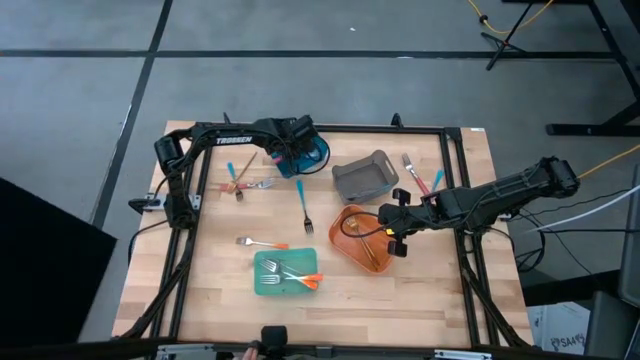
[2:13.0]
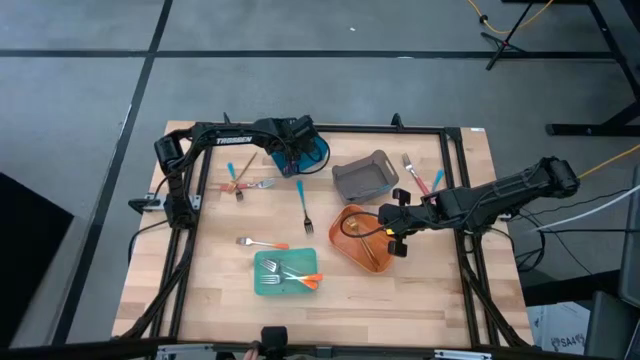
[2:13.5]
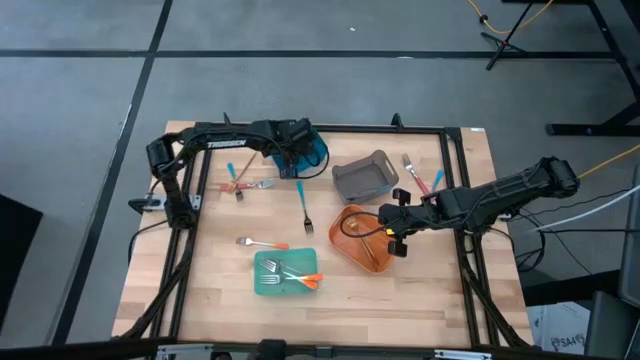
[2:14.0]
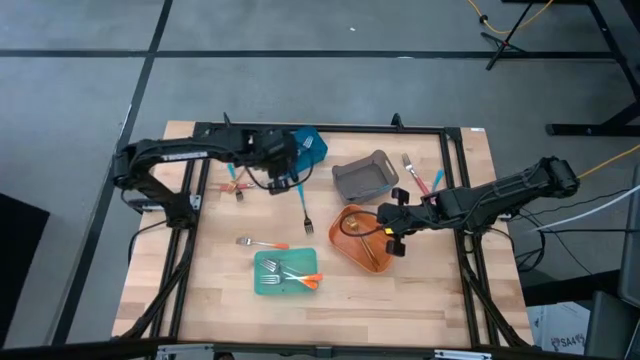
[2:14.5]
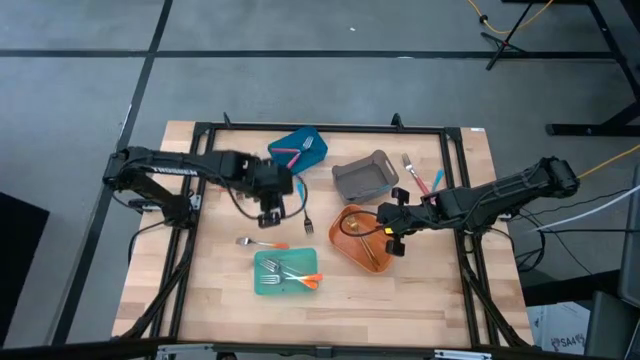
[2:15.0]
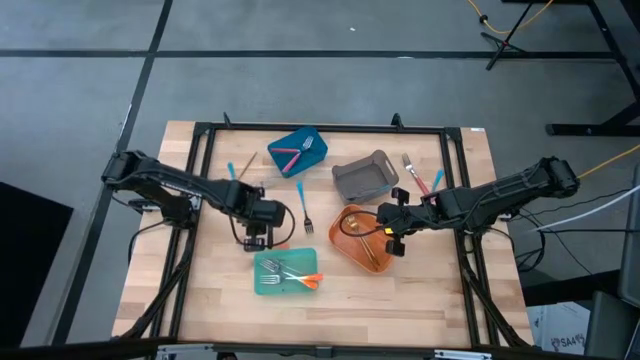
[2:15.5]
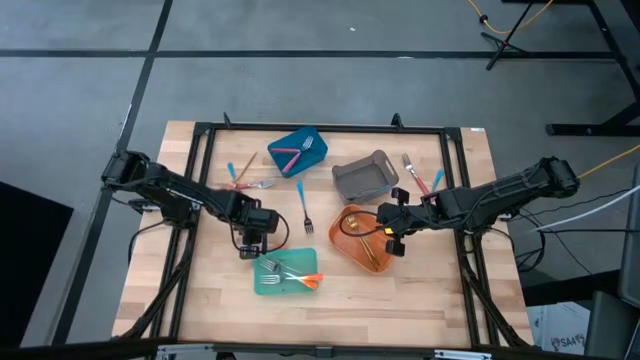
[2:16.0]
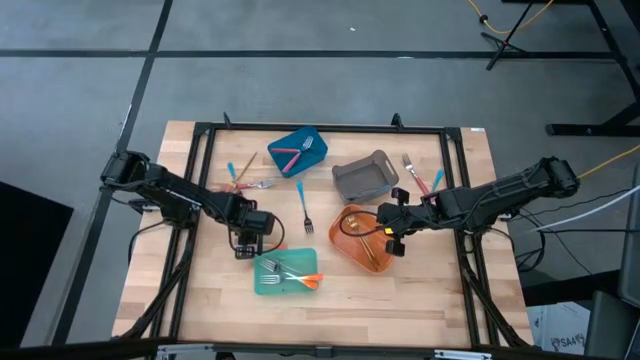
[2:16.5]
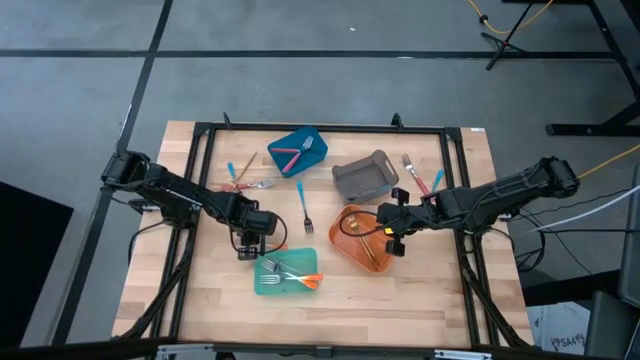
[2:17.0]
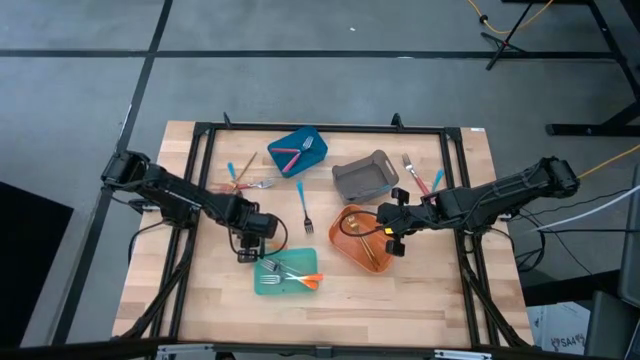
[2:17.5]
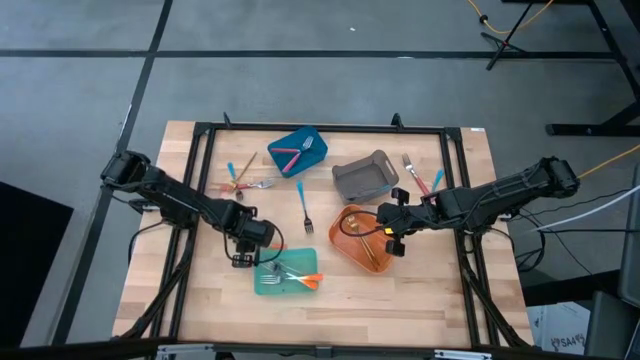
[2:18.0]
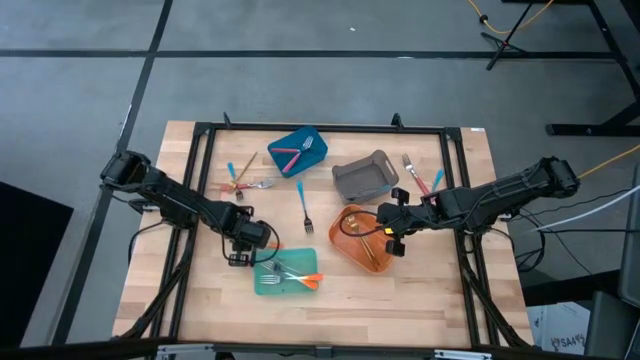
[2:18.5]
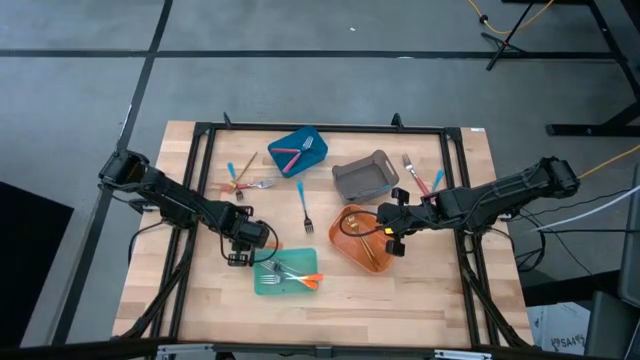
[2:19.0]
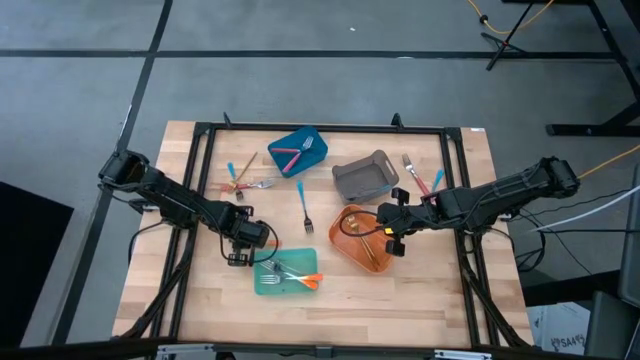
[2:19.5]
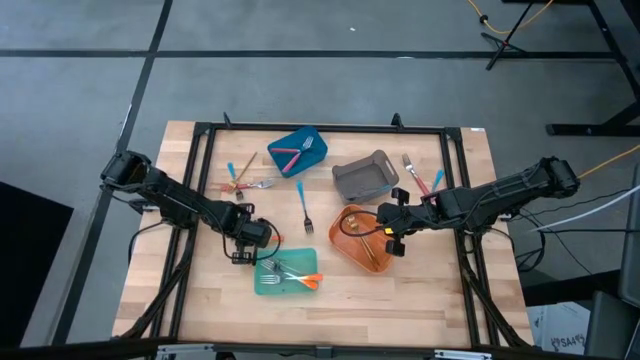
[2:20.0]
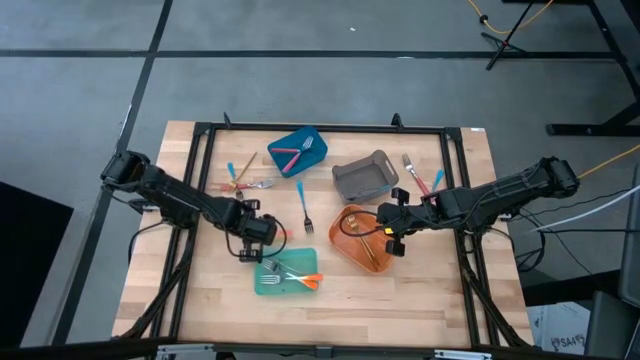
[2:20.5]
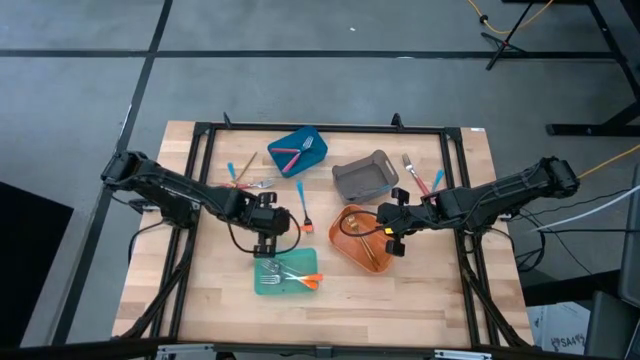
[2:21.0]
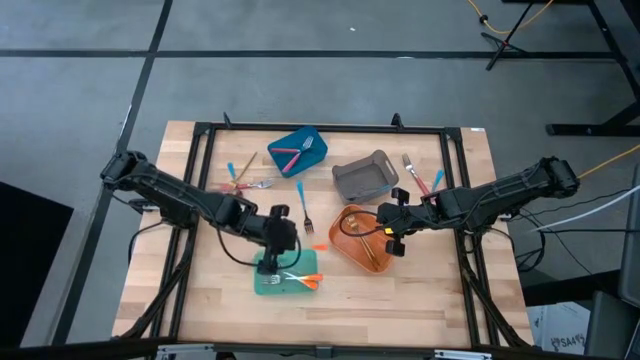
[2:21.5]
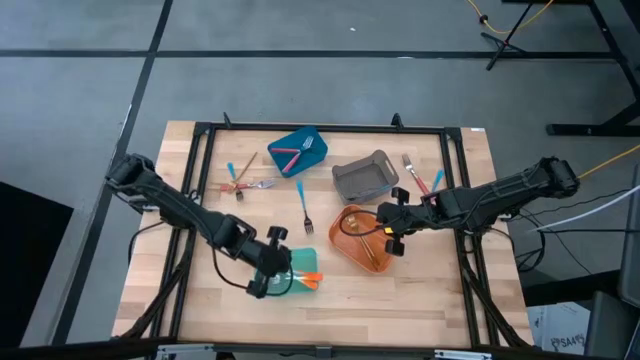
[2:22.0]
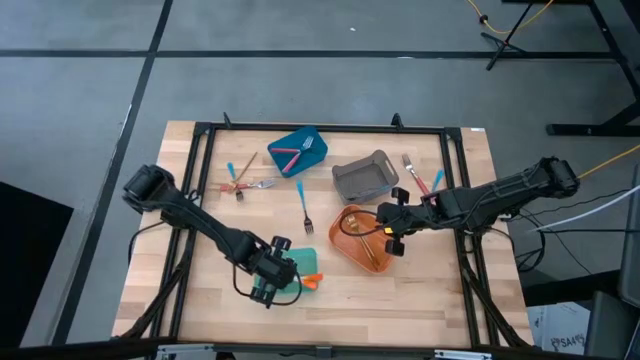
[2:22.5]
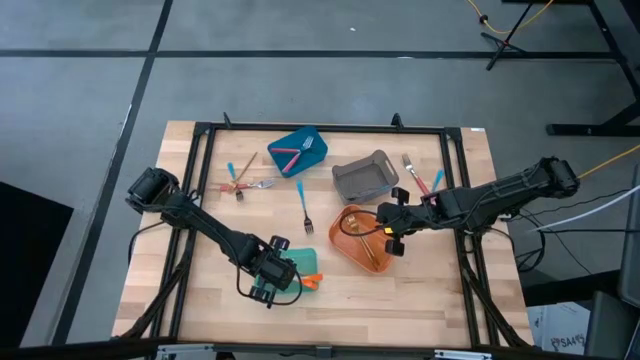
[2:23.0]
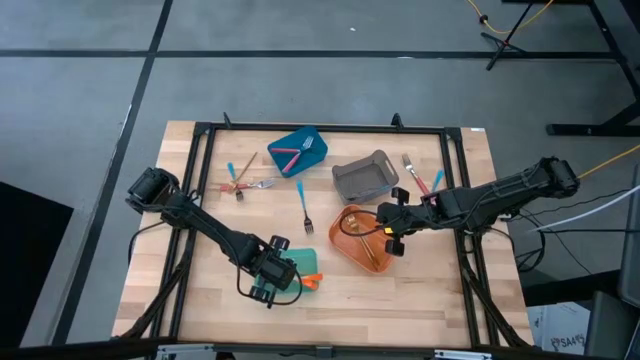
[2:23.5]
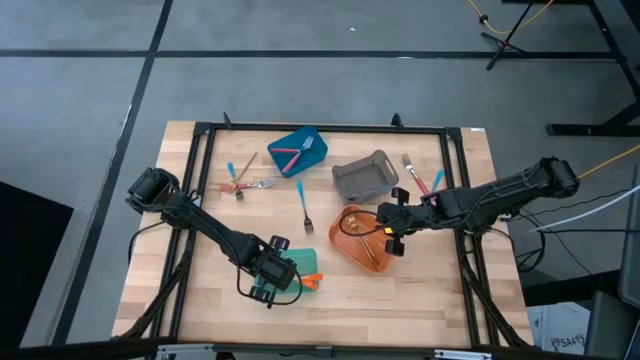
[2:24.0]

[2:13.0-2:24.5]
Task: Sort silverware by color (type)
Put the orange fork into the green bin

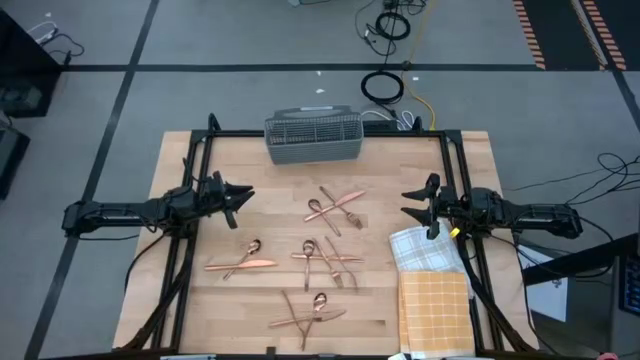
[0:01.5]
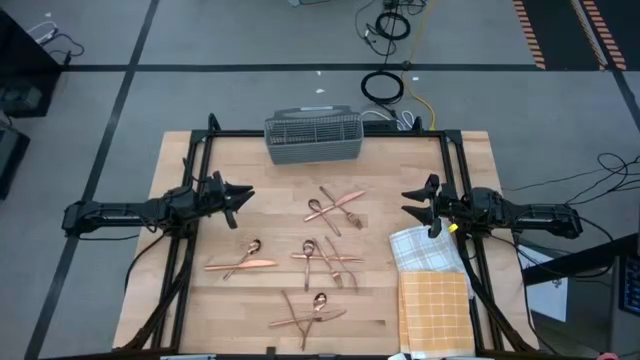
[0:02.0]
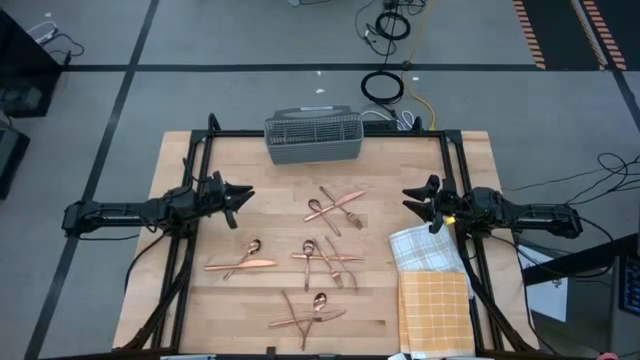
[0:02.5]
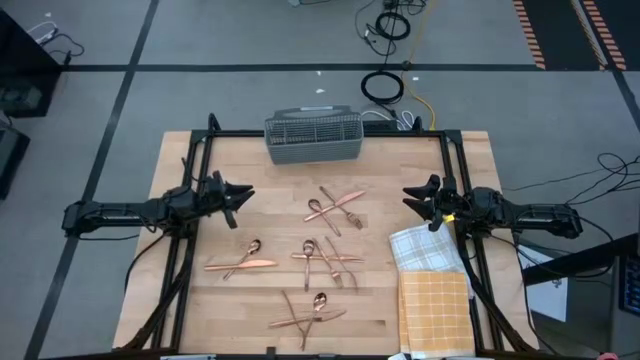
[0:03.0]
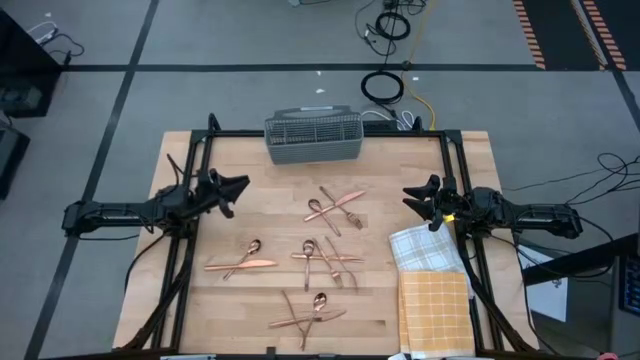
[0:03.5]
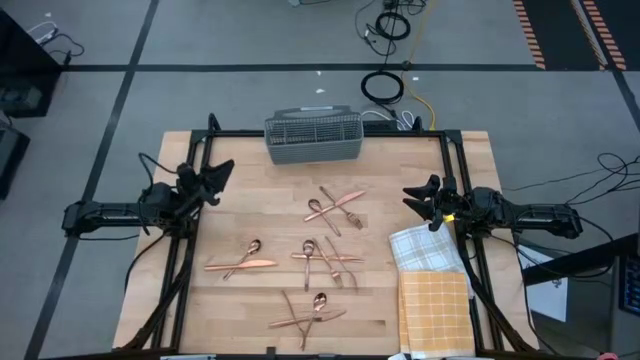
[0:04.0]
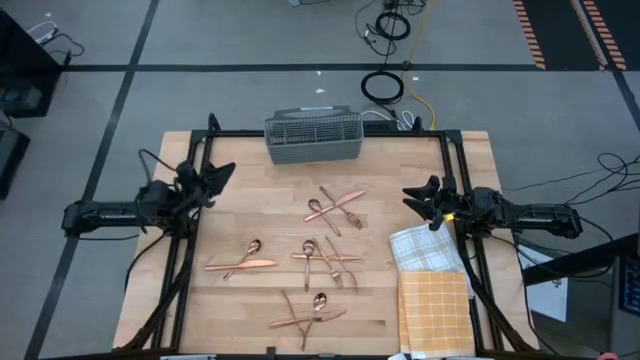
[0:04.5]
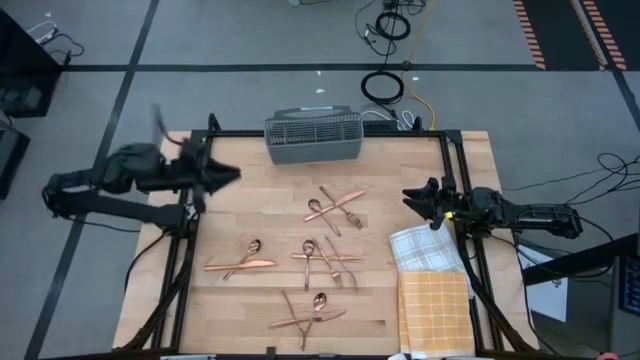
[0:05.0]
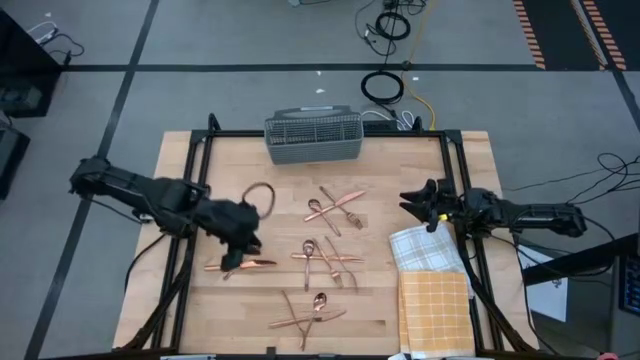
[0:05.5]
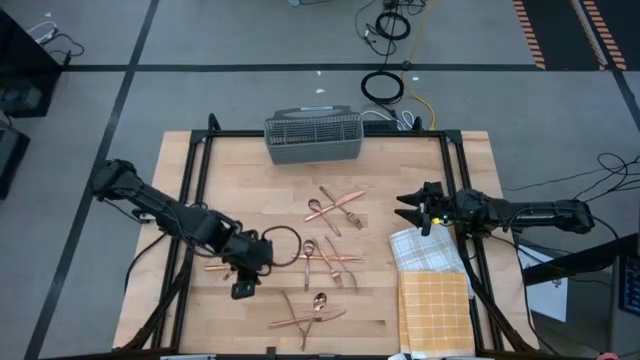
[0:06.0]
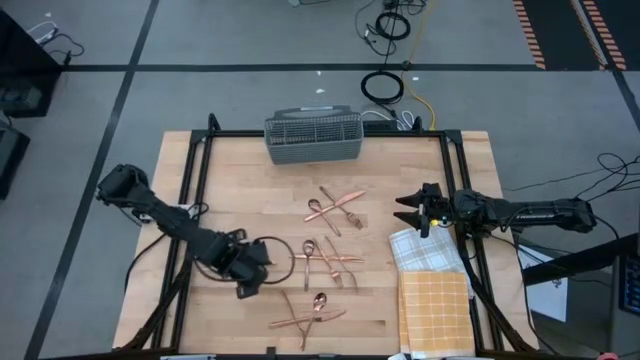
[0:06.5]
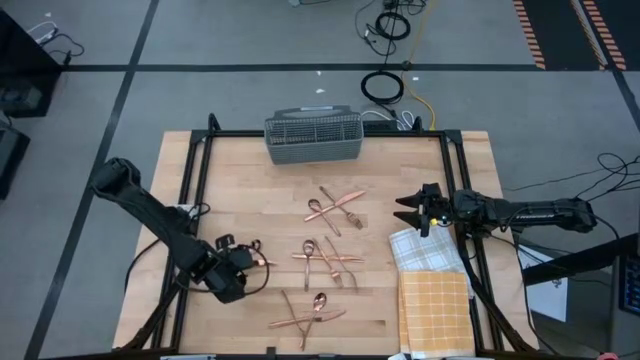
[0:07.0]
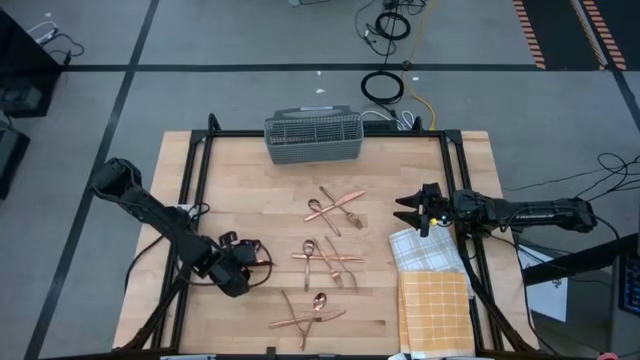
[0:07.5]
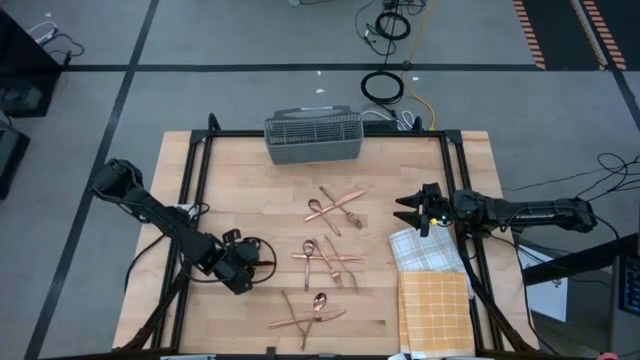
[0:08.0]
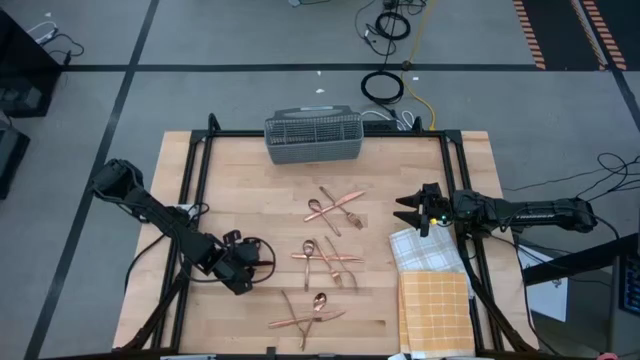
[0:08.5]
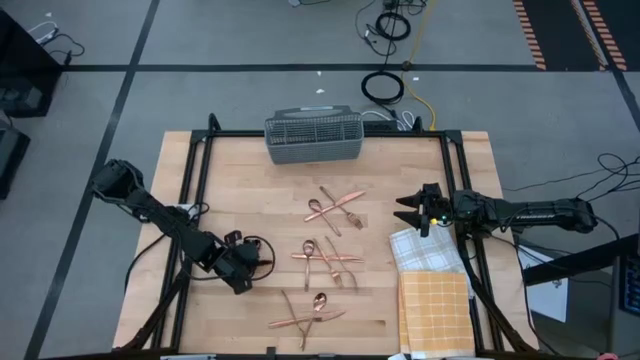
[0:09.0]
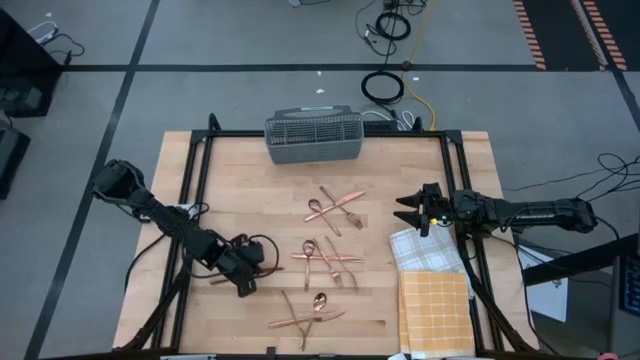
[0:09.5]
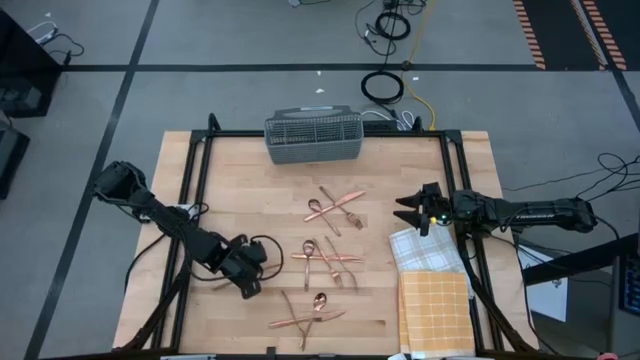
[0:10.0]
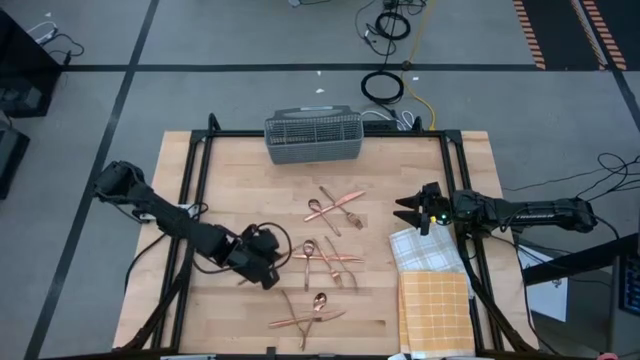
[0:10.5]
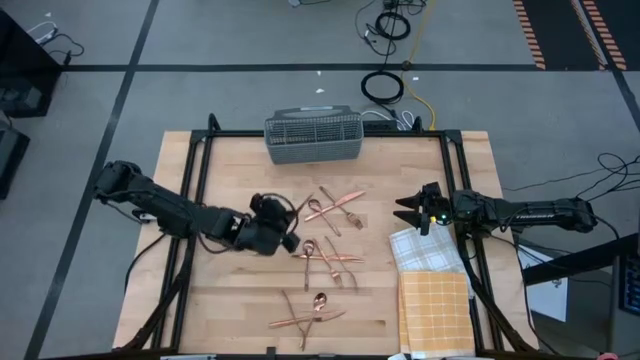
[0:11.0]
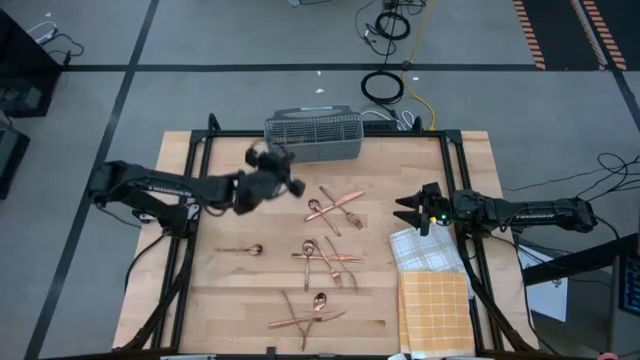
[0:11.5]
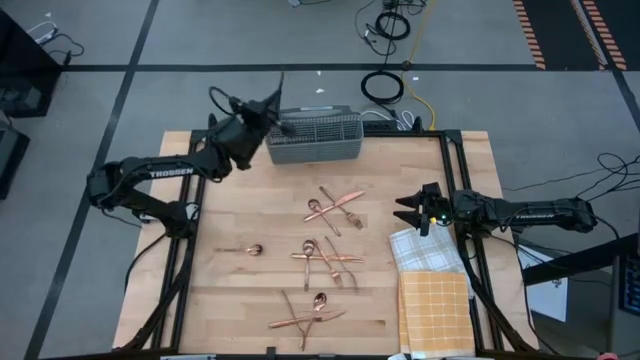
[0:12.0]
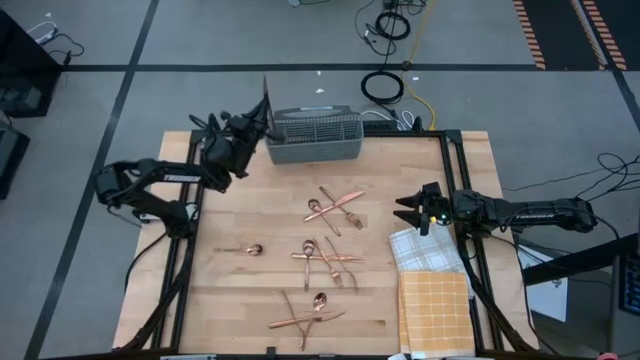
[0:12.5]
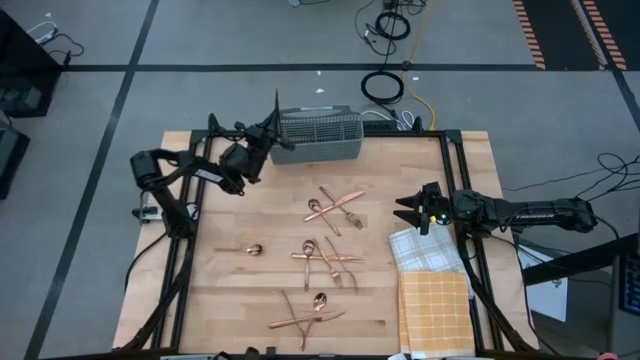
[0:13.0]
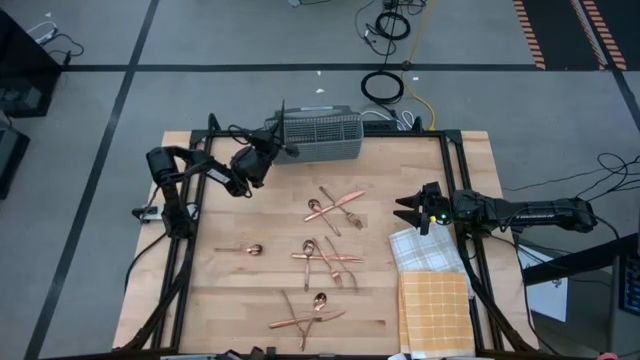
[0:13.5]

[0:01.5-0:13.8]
Task: Sort silverware
Put the middle left bronze knife into the gray silverware rack
